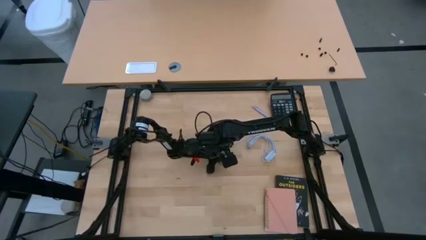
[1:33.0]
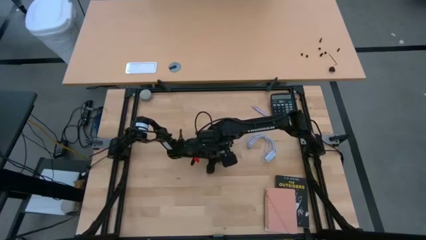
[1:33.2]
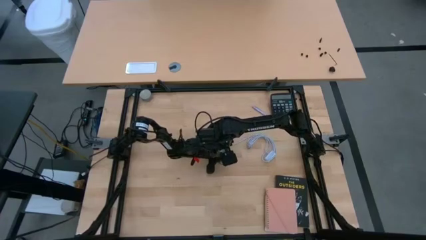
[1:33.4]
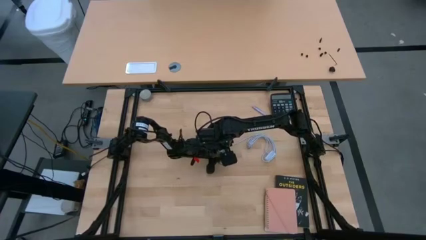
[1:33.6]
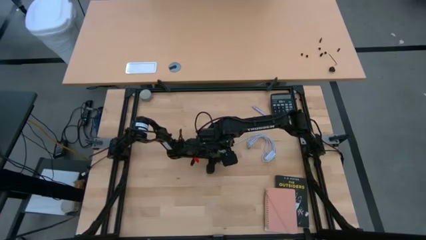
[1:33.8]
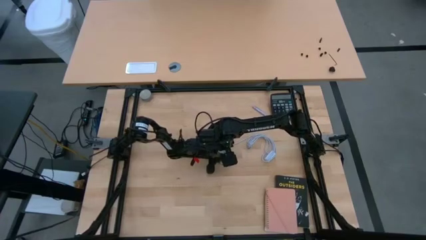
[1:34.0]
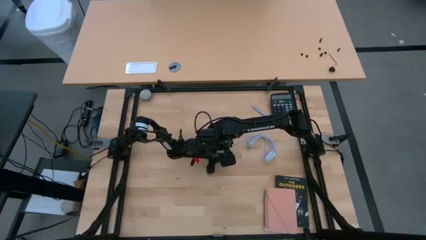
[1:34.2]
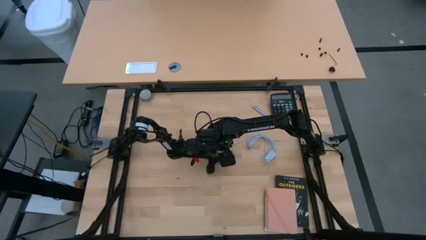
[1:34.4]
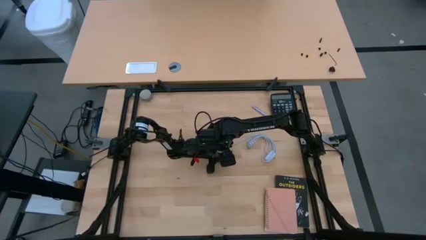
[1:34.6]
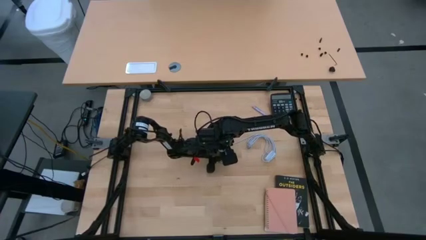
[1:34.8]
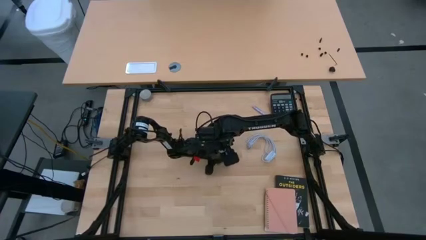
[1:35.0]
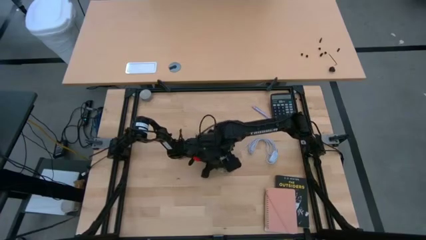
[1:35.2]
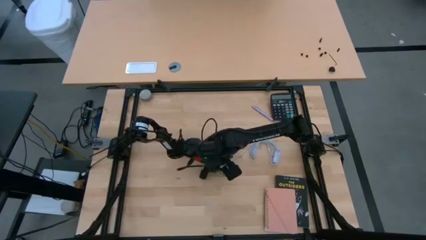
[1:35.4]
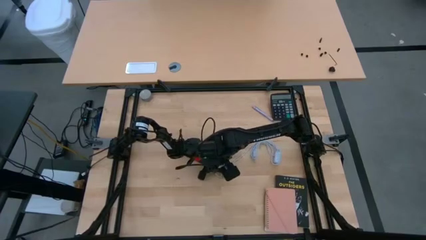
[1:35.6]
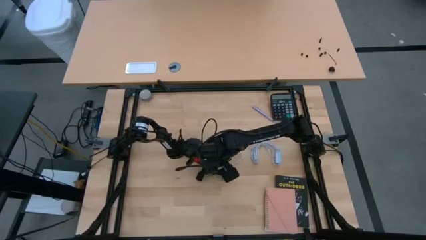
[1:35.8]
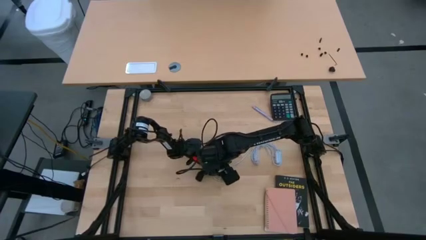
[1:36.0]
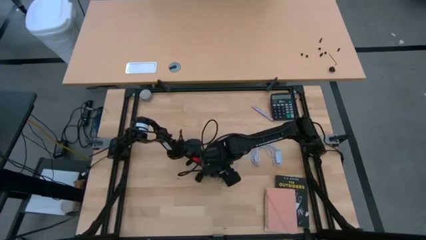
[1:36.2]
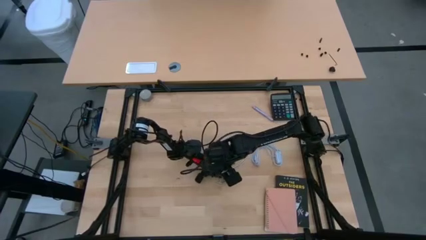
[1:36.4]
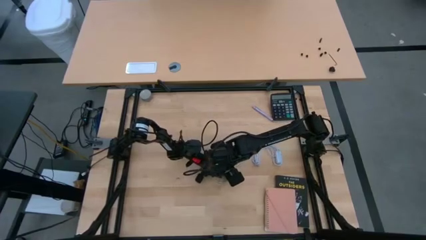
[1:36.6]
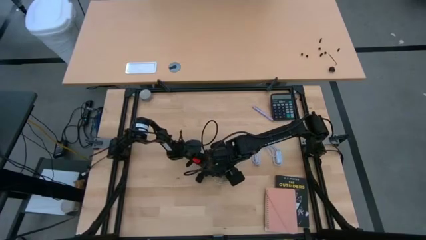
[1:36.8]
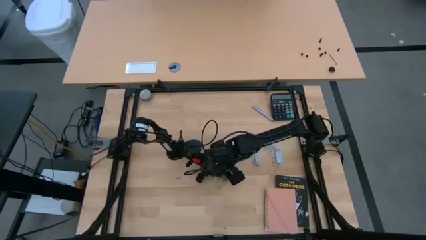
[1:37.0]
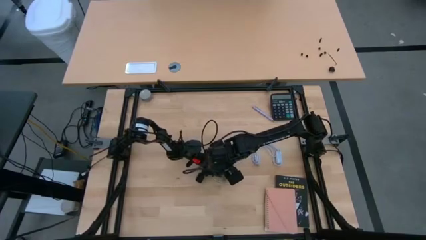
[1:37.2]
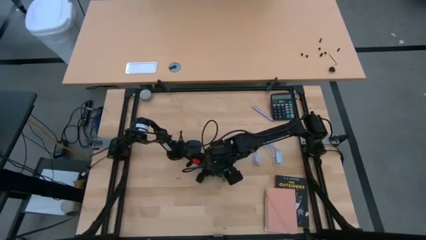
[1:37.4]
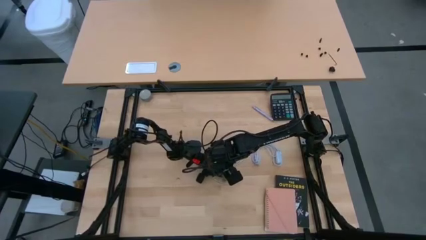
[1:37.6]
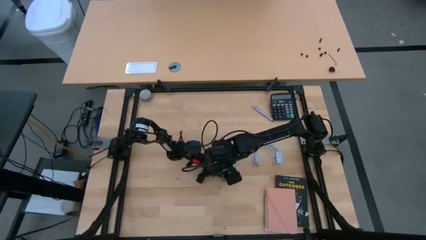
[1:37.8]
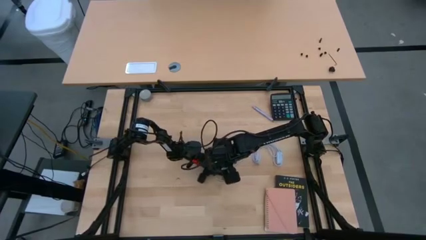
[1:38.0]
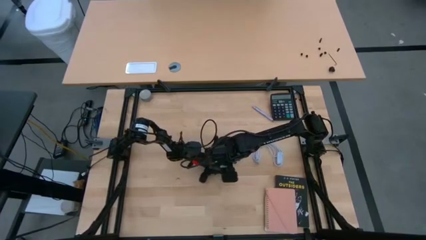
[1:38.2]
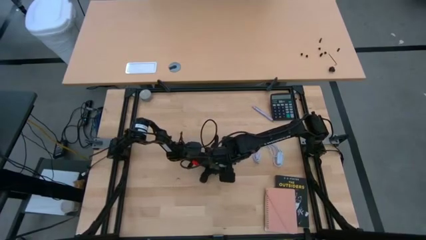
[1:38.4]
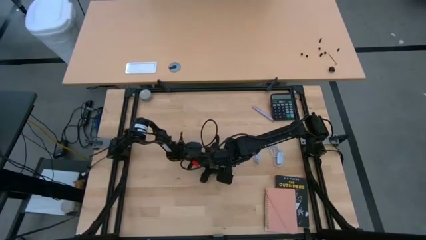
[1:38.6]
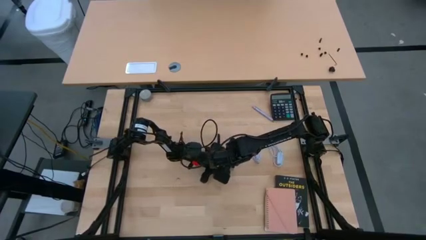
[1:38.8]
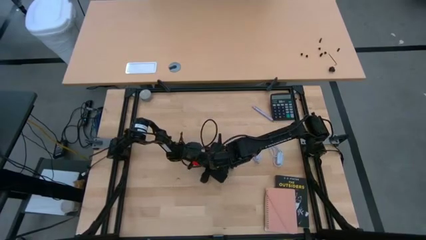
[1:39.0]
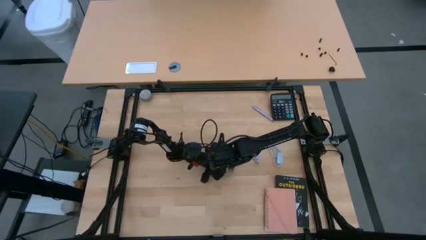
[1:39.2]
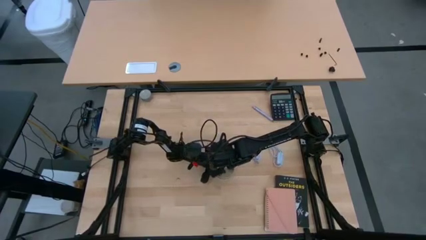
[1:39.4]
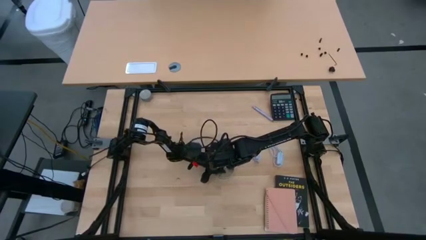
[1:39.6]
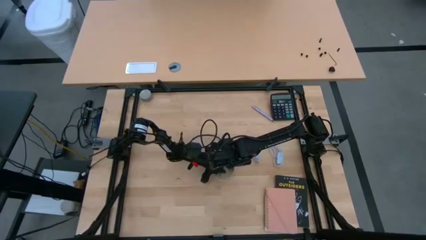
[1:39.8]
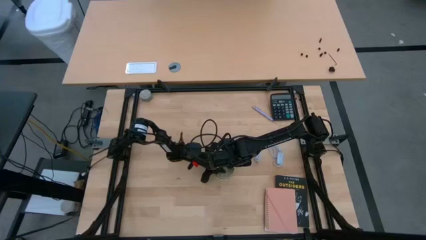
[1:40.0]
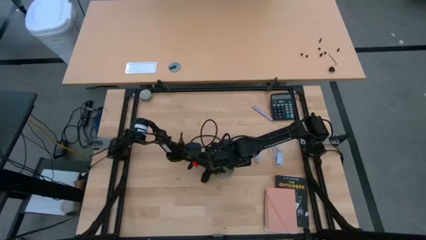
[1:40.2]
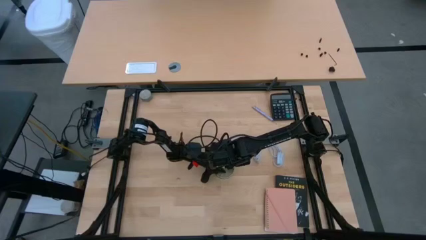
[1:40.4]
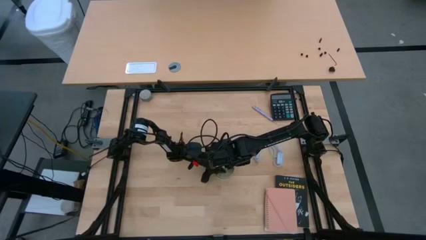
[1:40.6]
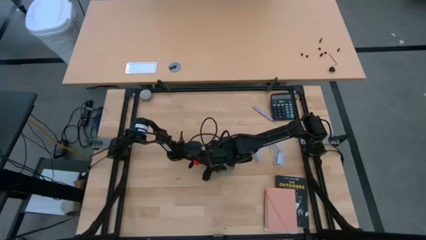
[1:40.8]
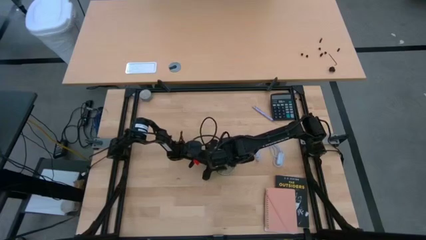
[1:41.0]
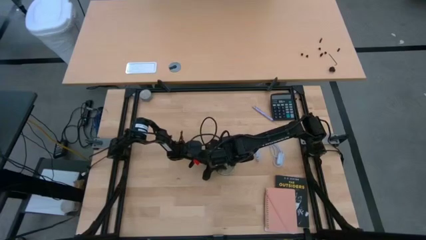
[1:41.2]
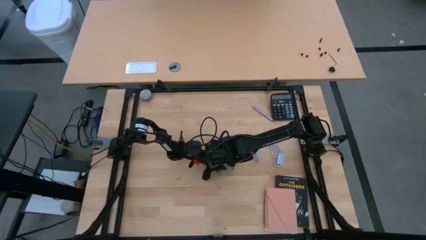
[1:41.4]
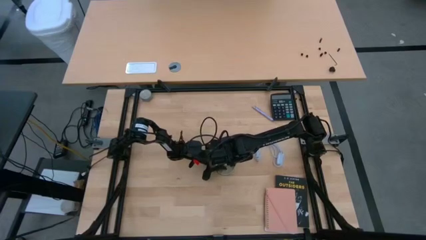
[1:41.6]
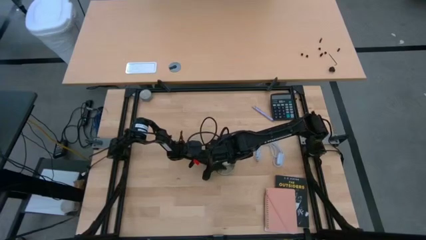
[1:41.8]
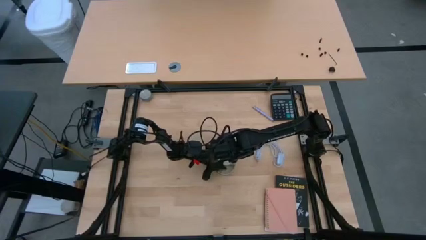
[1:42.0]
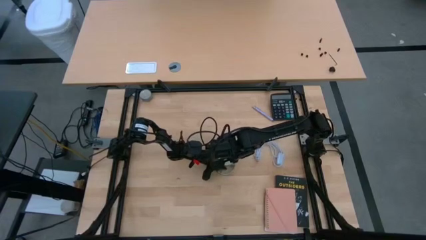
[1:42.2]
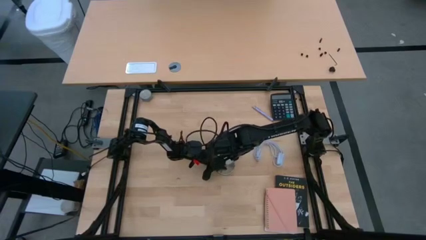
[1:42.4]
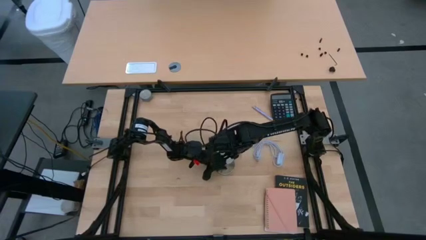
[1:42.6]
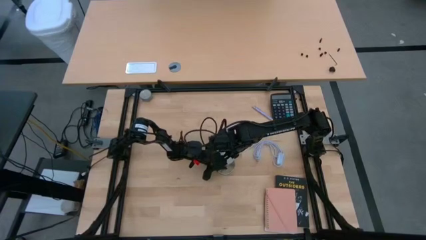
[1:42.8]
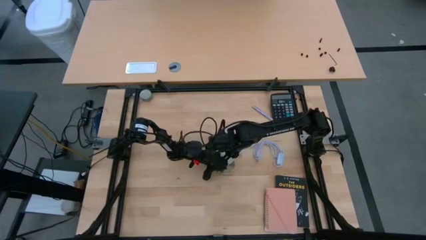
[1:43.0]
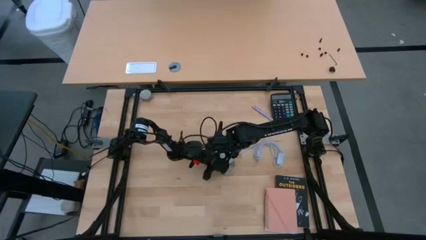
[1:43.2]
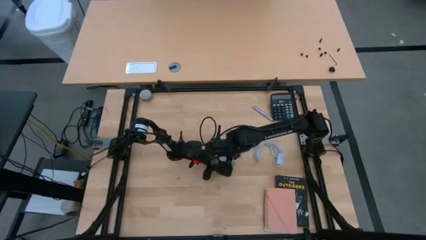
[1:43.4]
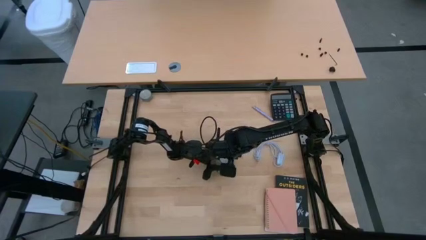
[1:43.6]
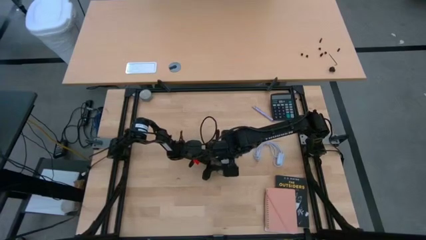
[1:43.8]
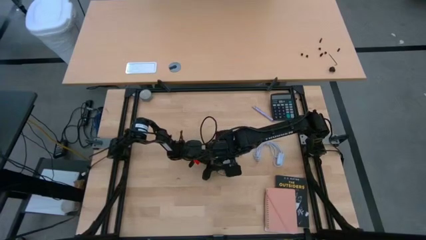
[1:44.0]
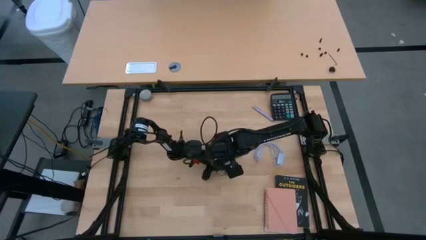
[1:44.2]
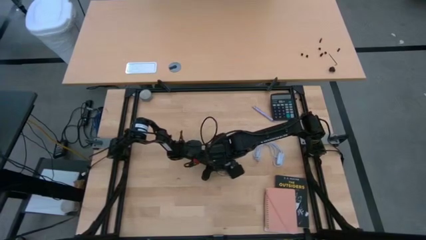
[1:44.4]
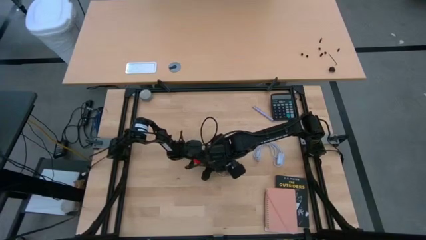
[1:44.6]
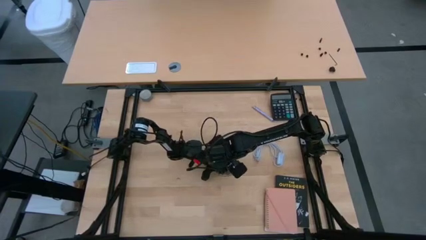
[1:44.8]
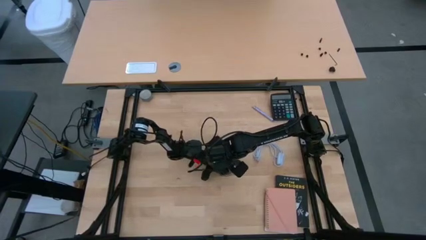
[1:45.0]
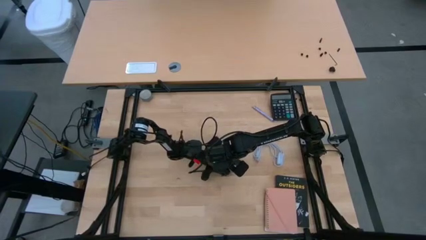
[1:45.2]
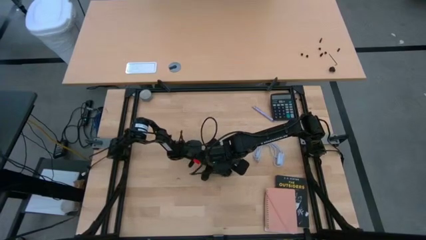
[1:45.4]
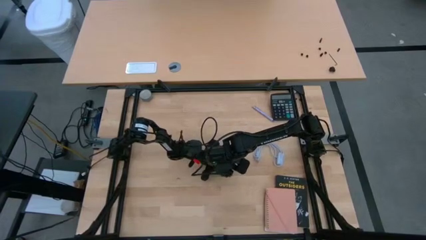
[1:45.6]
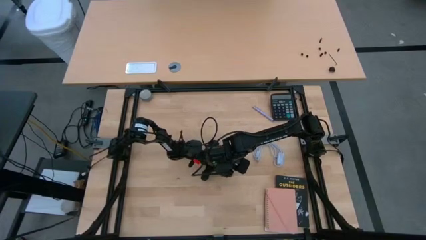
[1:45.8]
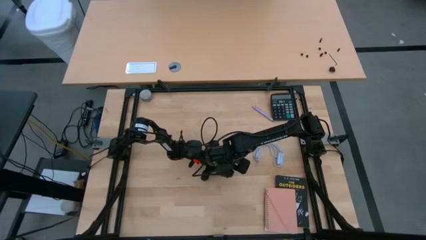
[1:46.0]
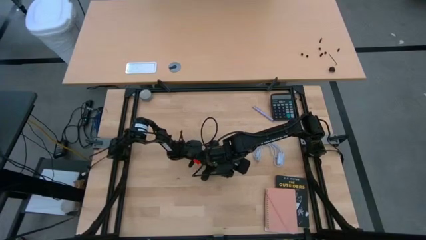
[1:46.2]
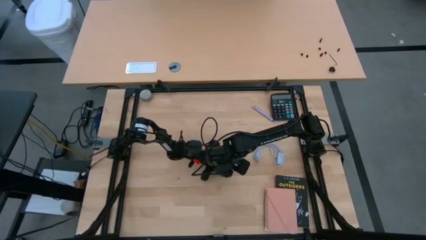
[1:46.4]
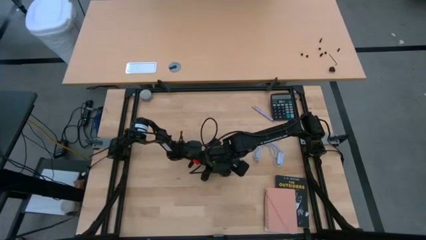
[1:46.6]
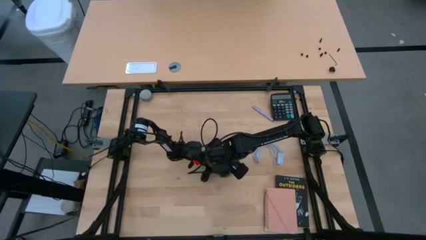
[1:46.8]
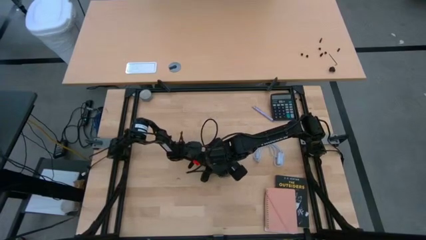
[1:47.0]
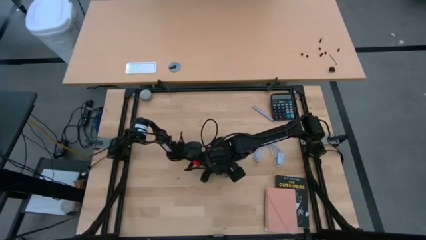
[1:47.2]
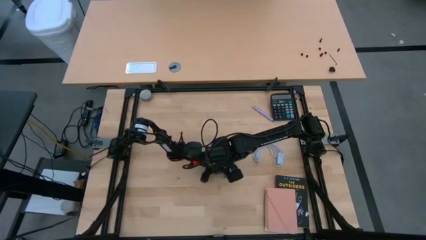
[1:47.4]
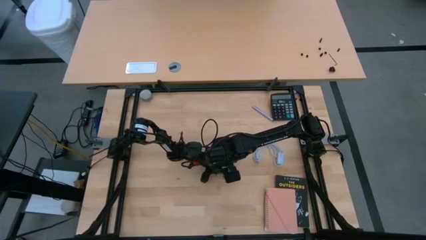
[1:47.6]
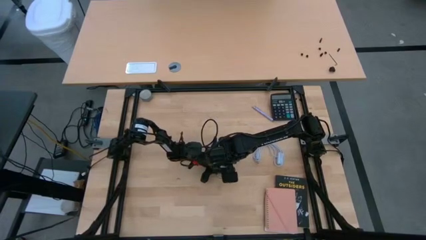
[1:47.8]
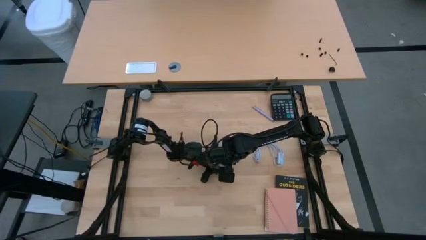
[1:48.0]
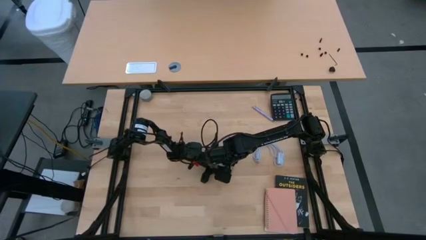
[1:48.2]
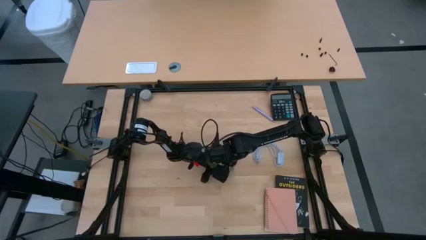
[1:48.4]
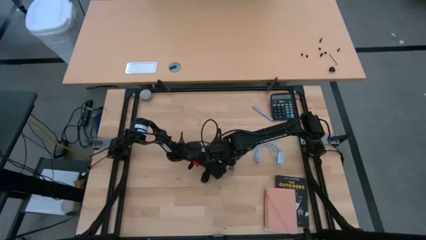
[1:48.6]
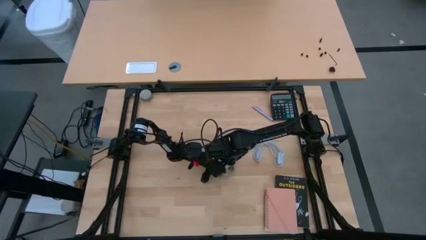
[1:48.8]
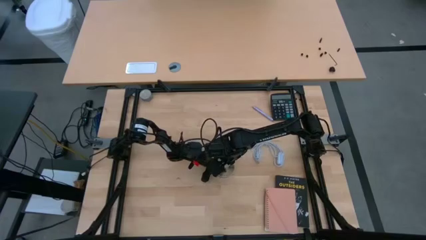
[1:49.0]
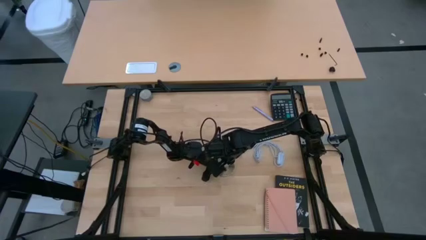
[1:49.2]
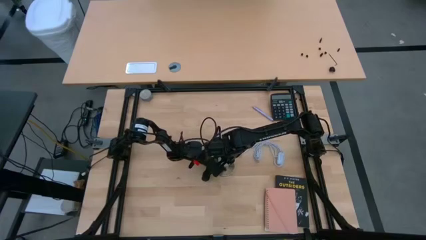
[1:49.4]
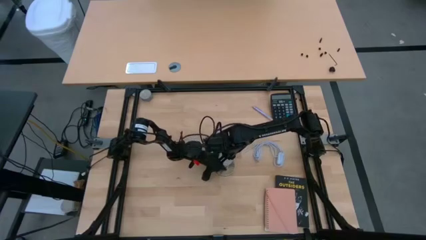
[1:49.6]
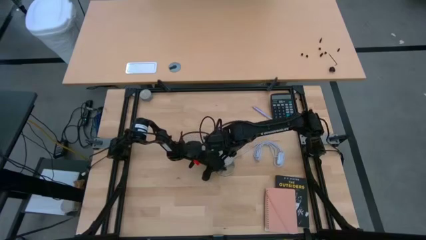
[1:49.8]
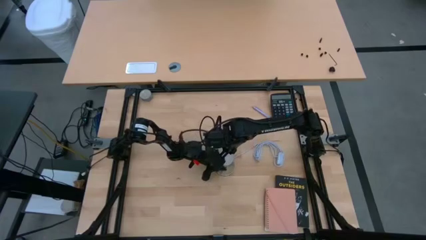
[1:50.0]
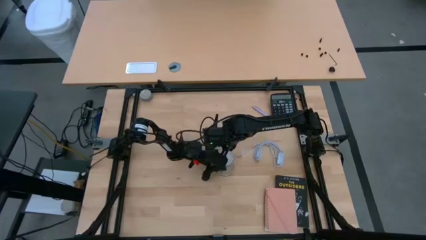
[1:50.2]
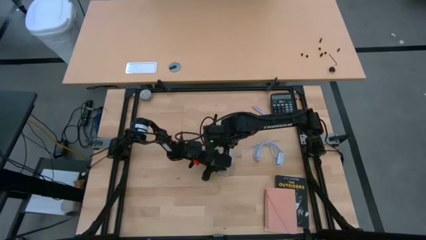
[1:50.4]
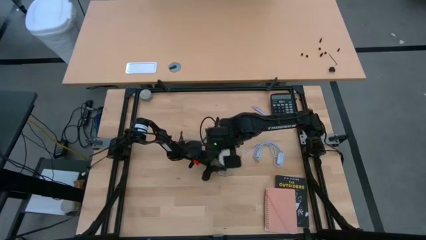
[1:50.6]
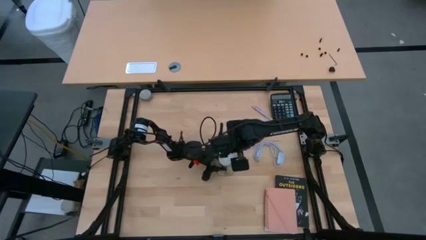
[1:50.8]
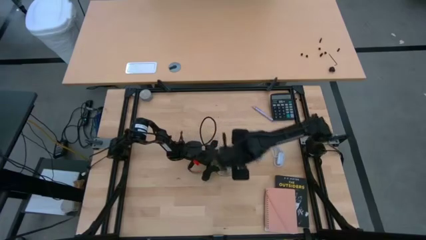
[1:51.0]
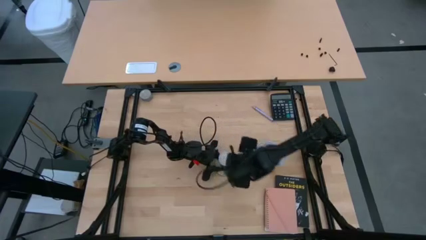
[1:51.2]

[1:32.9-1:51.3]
Task: Screw lightbulb
Insert the light bulb into the lamp
